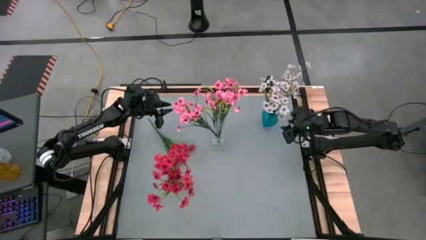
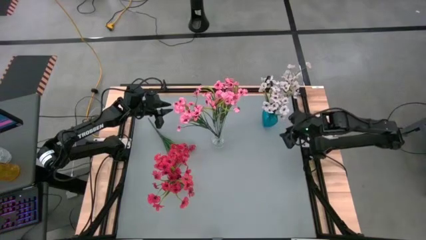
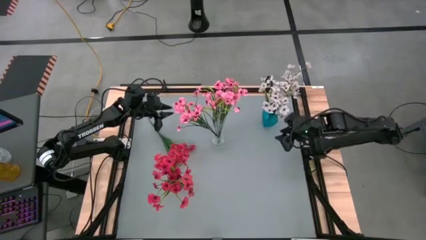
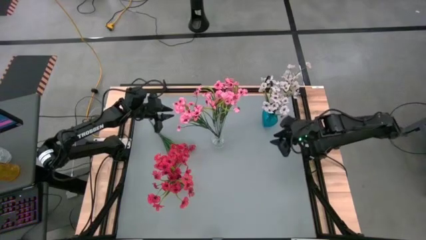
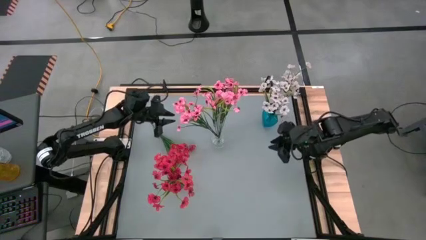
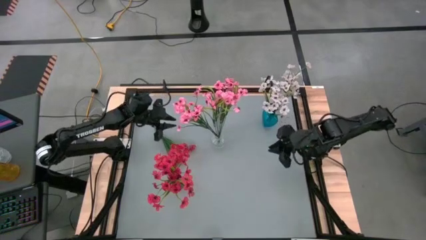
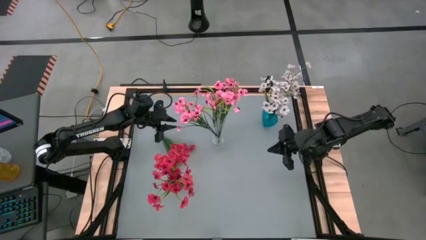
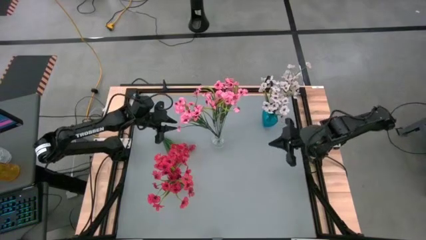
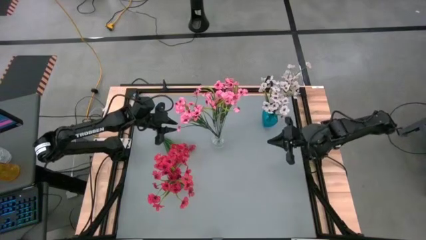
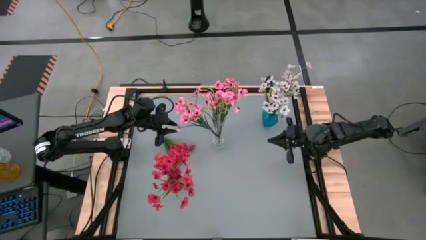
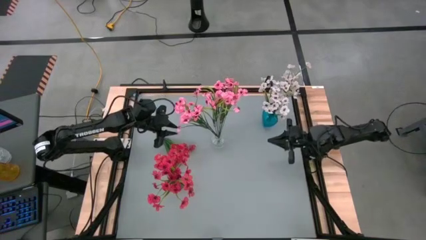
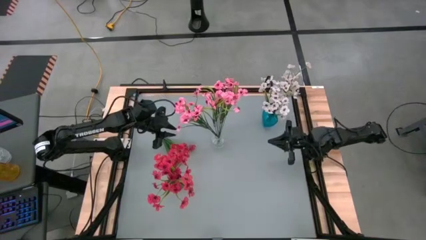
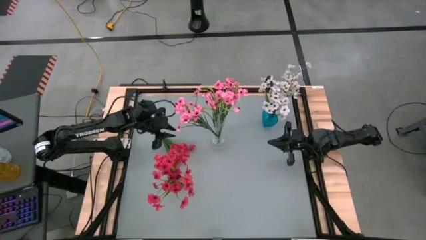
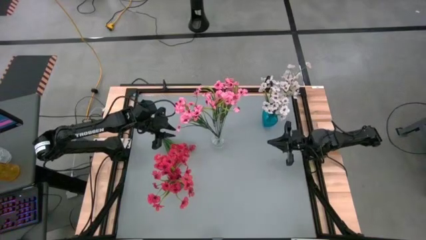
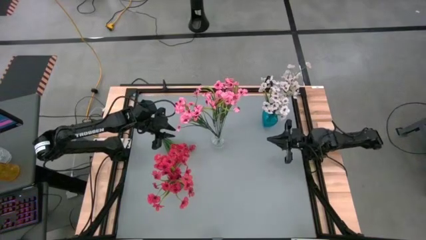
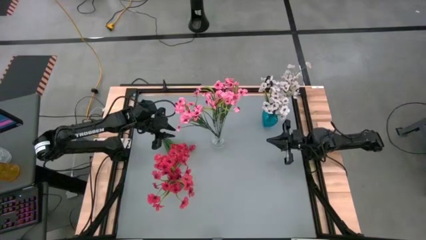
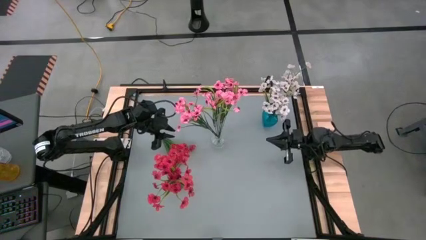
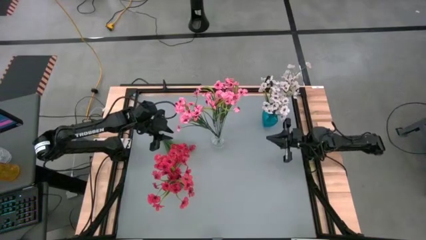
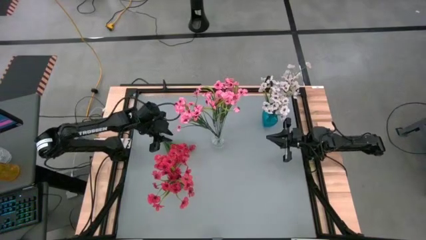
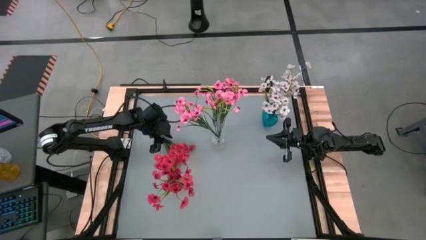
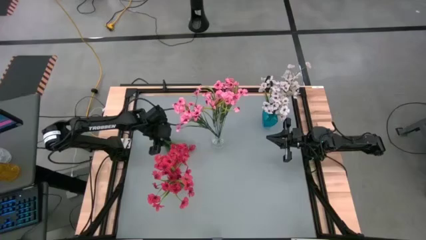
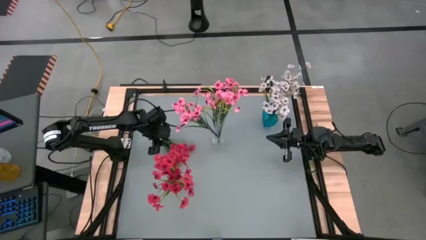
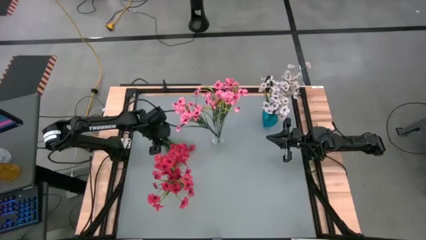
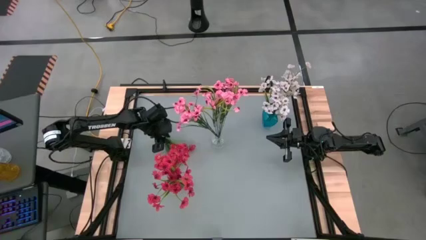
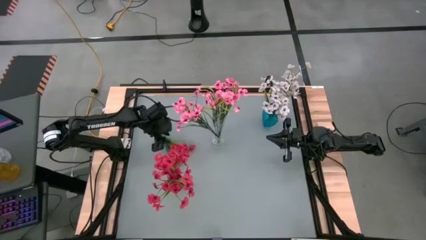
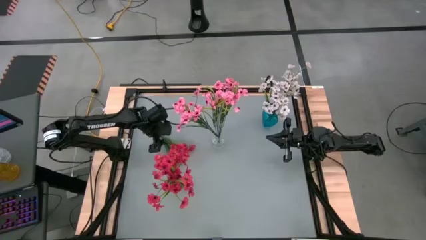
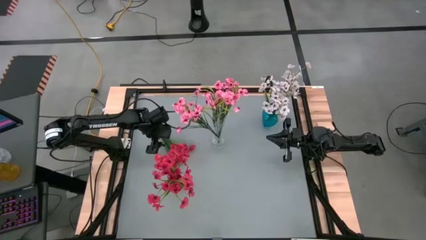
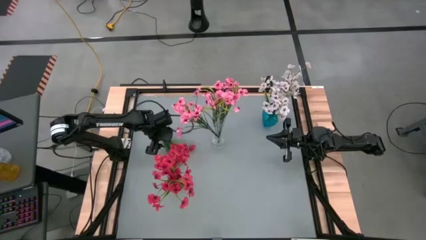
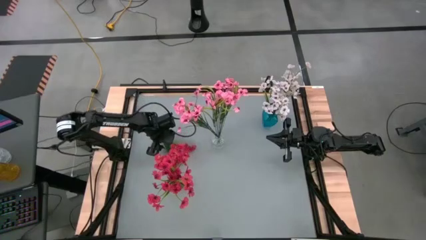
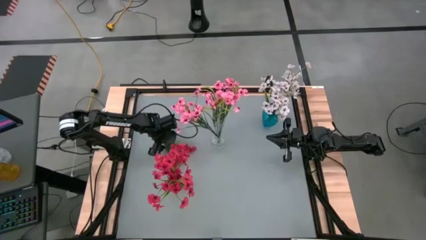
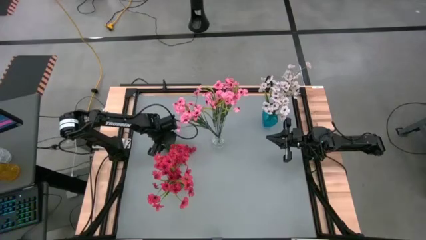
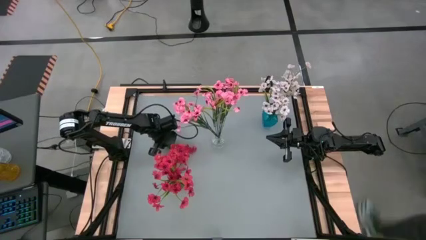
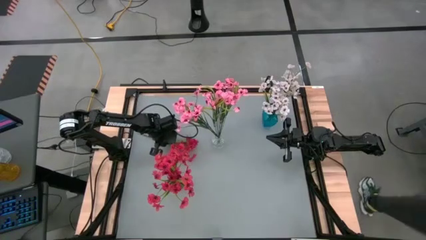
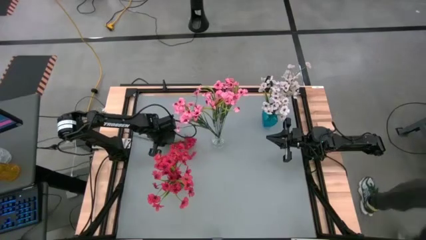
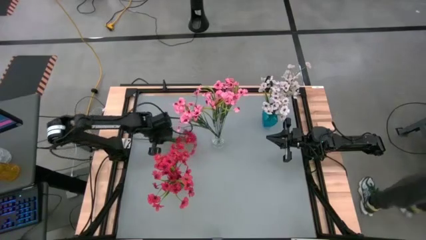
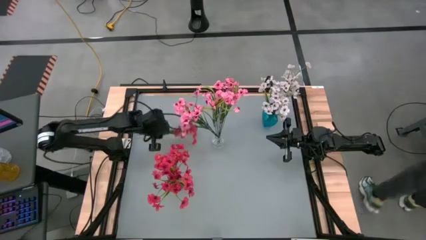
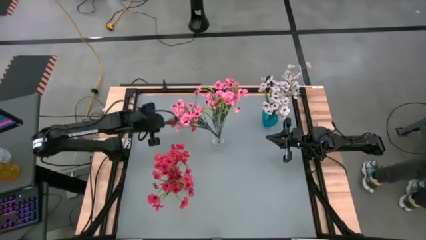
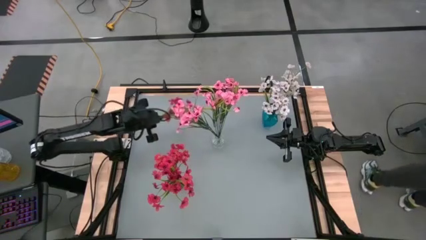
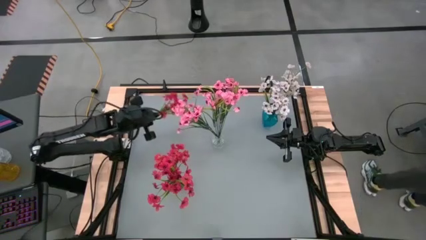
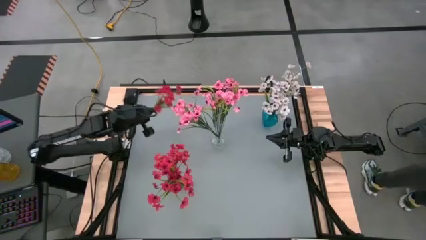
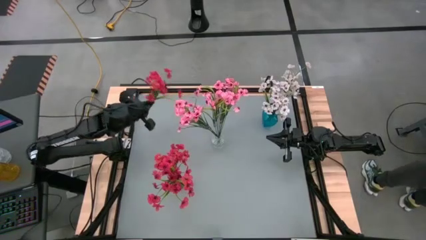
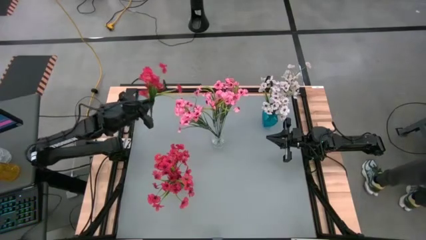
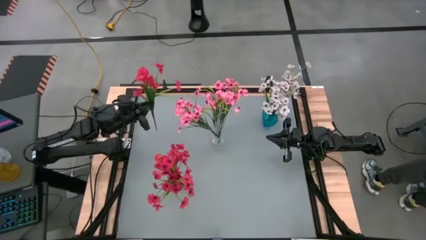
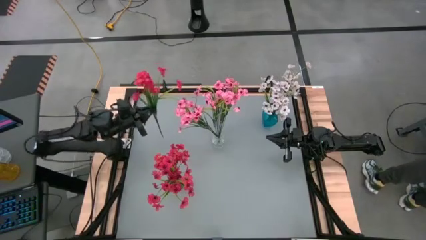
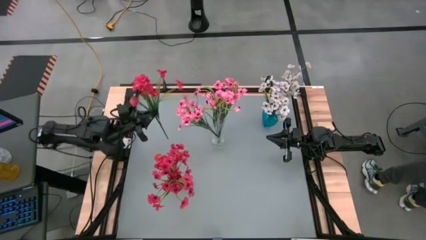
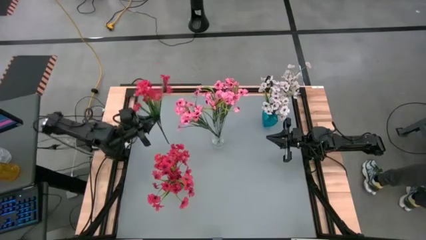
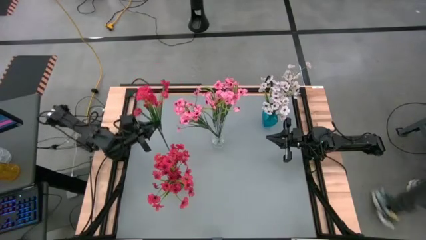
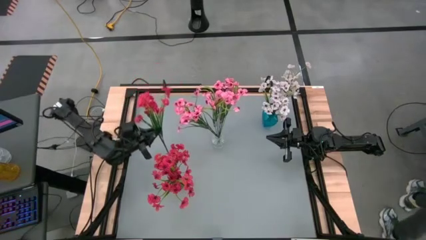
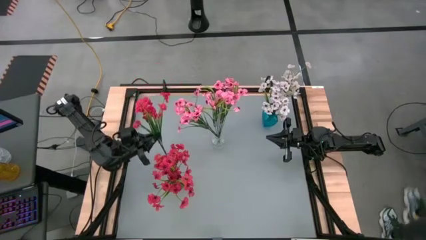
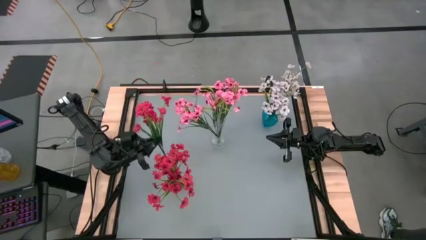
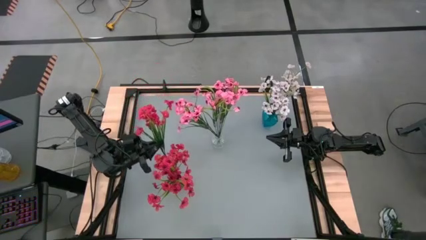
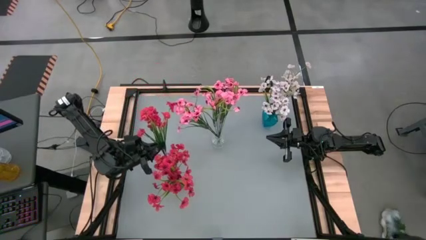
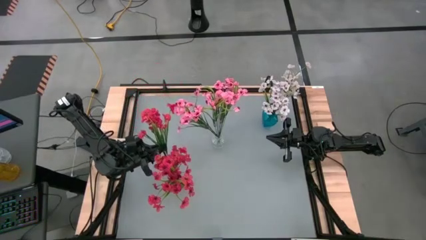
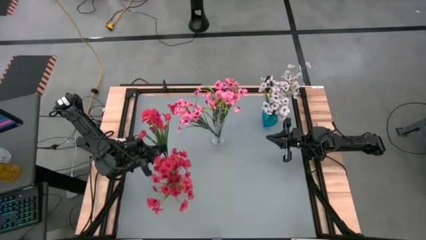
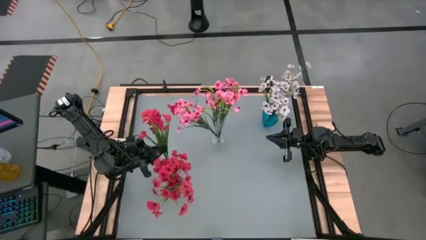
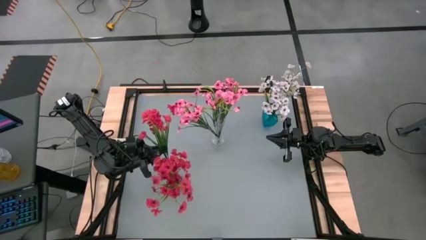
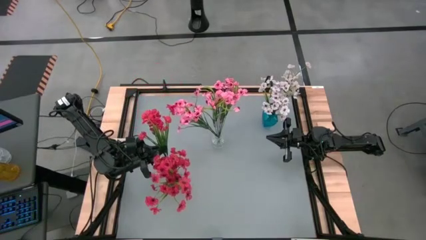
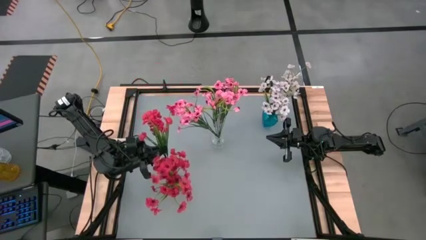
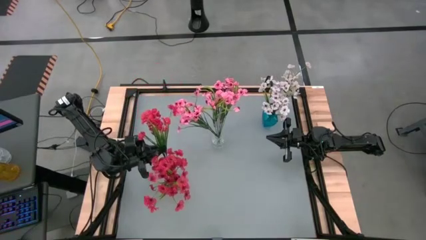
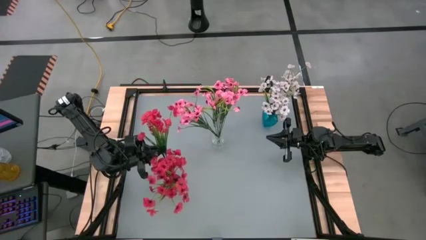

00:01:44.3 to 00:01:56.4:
Task: Sort flowers into vase by color
Put the red flowers into the red vase

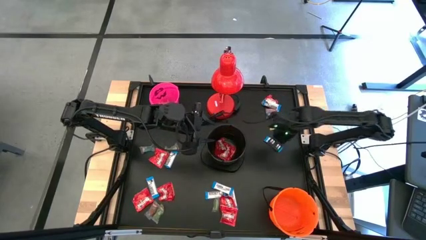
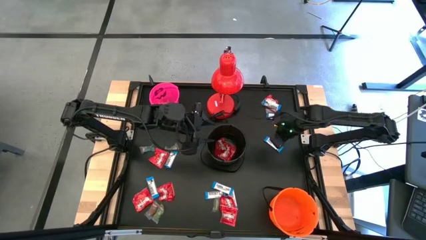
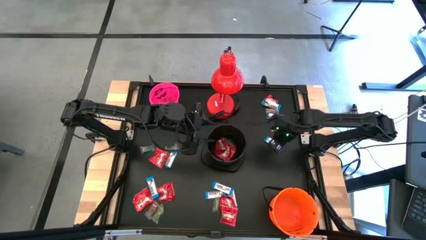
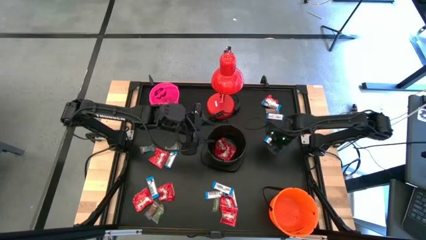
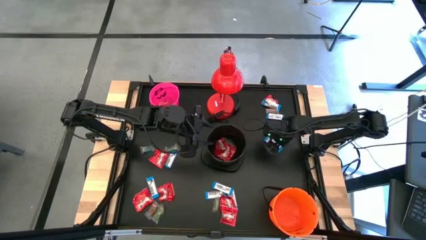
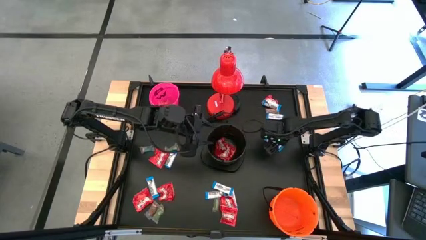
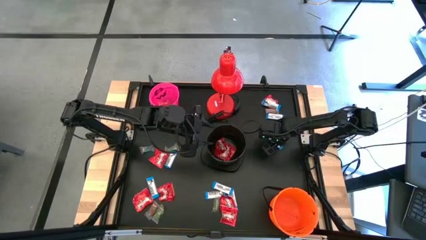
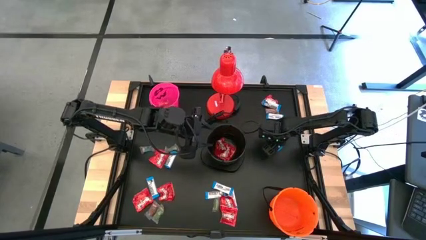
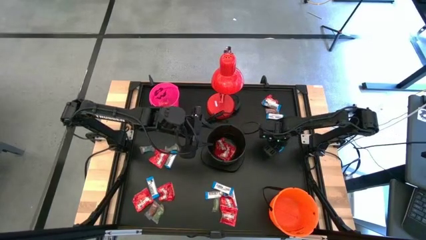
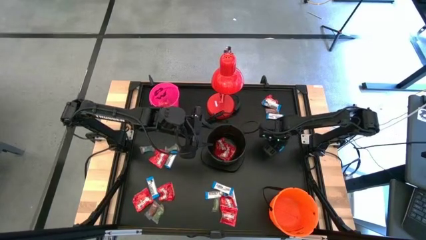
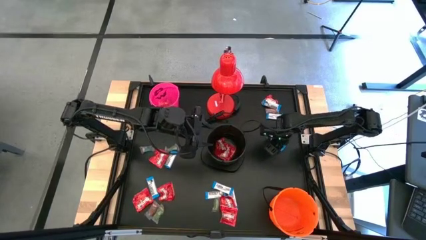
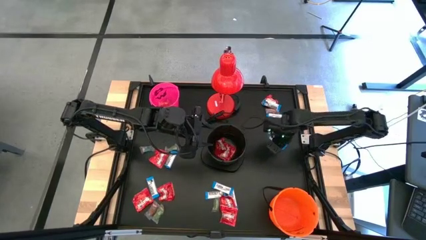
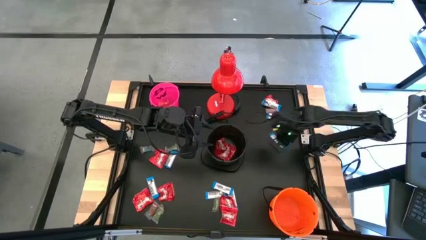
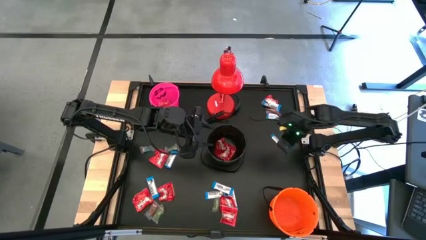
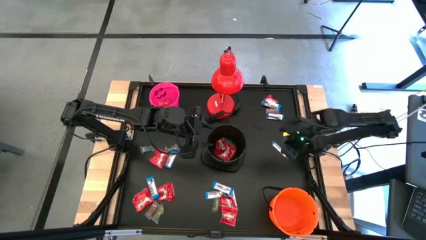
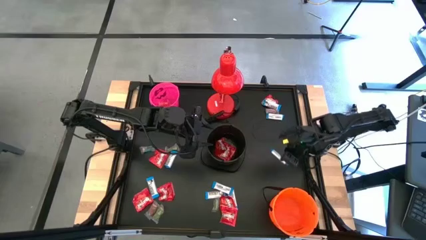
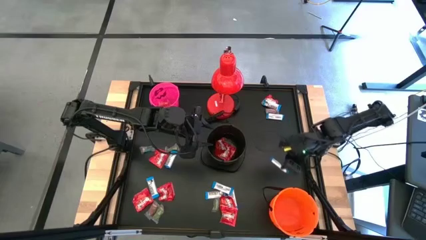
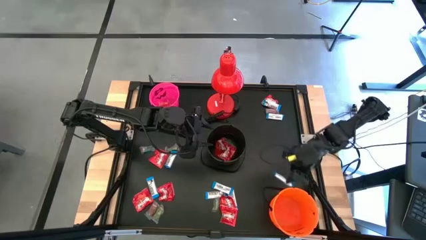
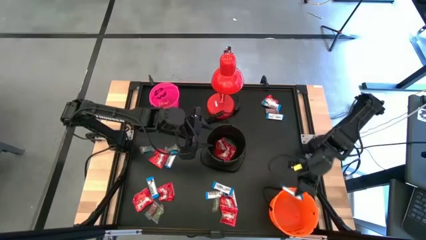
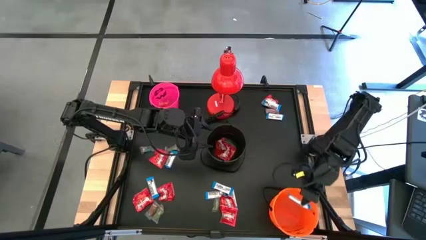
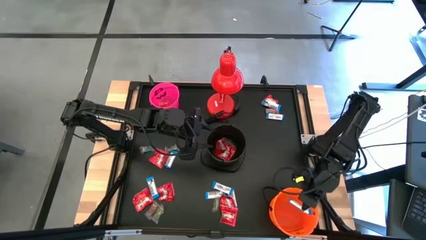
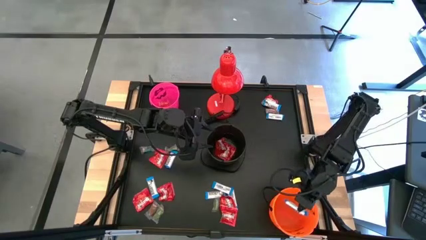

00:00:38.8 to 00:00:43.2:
Task: Organize candy in baskets
Put the white chocolate into the orange bucket
